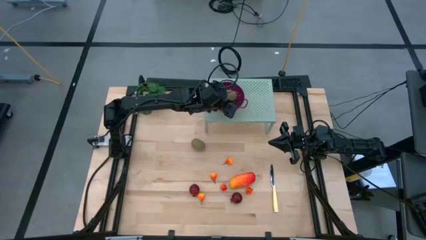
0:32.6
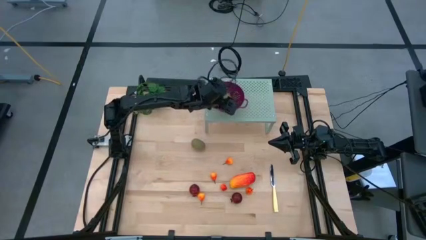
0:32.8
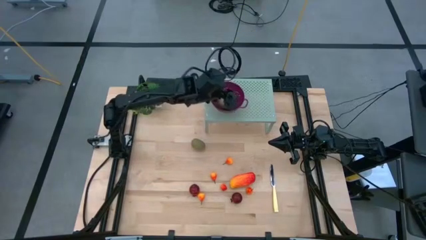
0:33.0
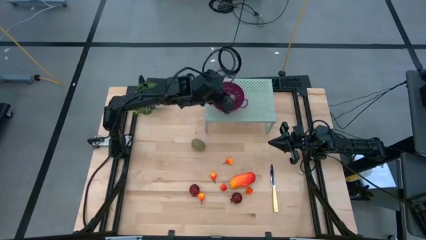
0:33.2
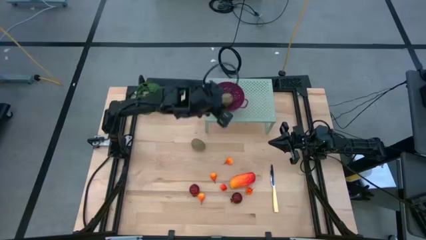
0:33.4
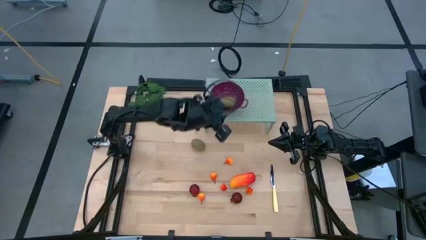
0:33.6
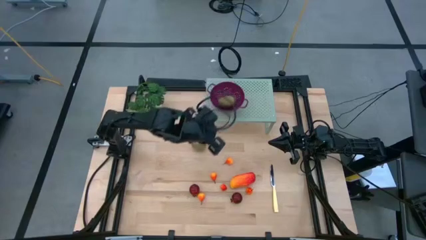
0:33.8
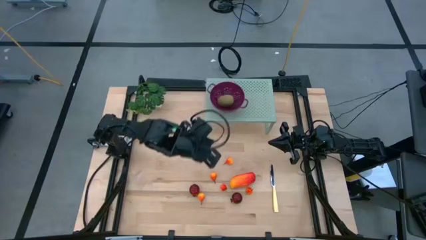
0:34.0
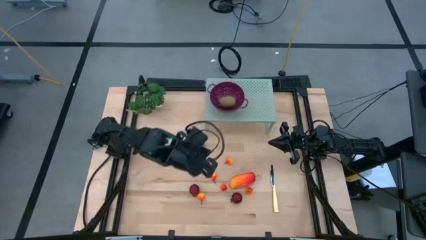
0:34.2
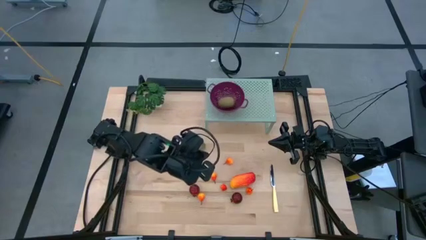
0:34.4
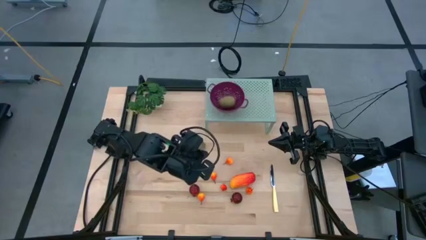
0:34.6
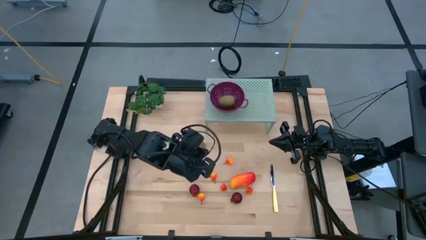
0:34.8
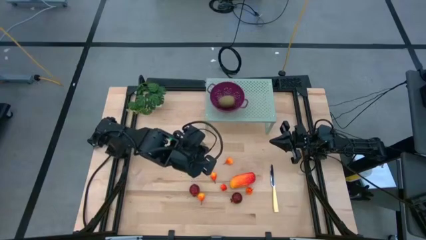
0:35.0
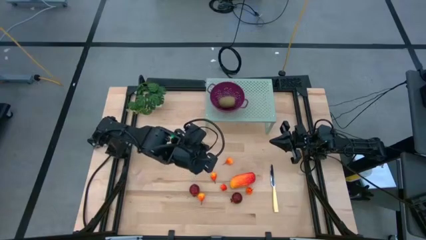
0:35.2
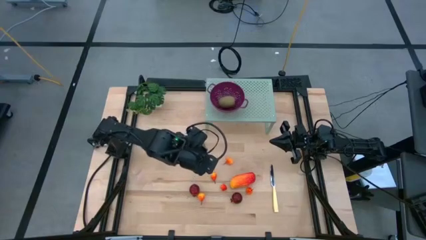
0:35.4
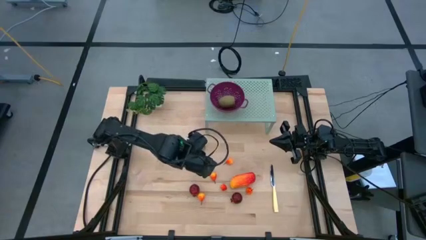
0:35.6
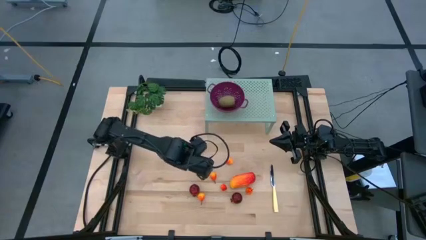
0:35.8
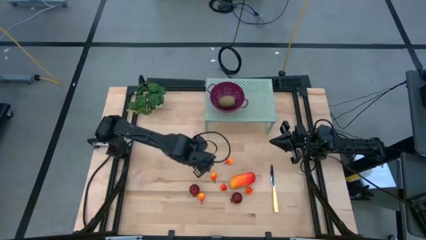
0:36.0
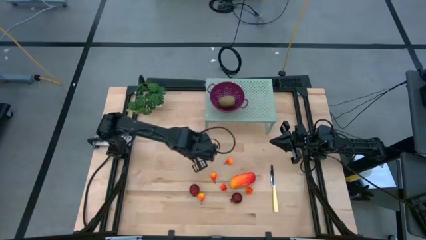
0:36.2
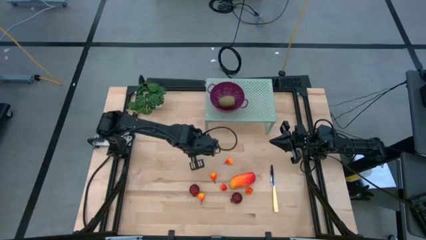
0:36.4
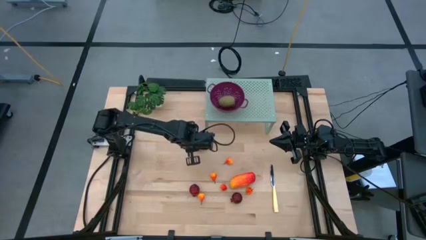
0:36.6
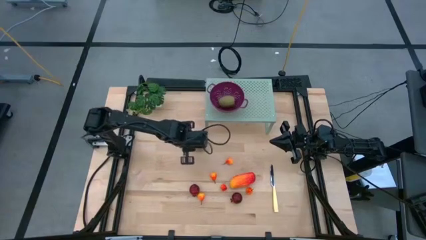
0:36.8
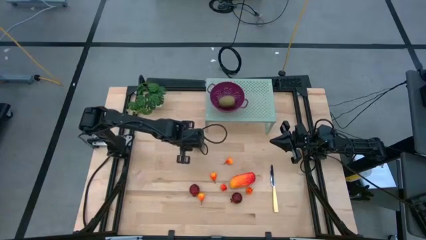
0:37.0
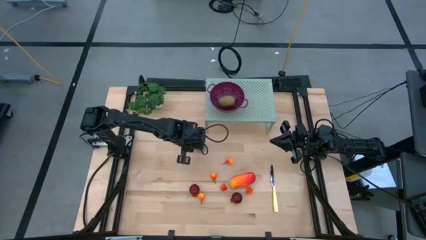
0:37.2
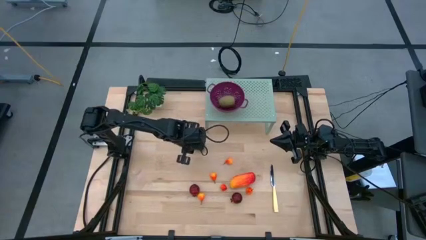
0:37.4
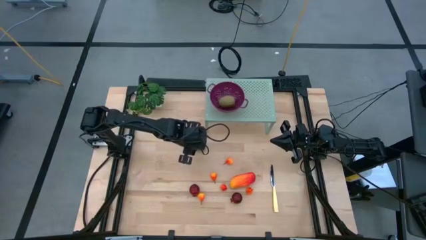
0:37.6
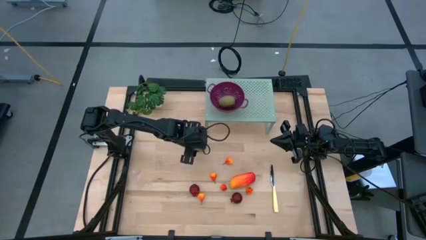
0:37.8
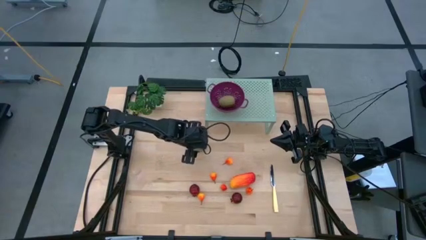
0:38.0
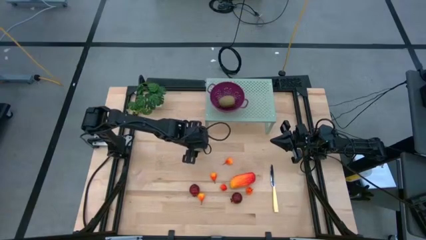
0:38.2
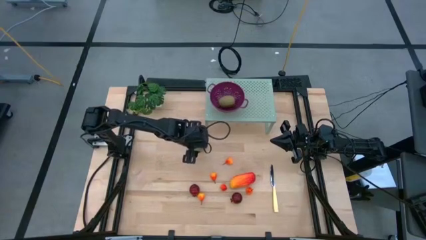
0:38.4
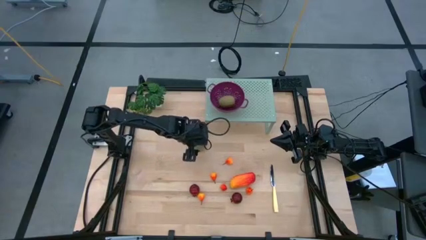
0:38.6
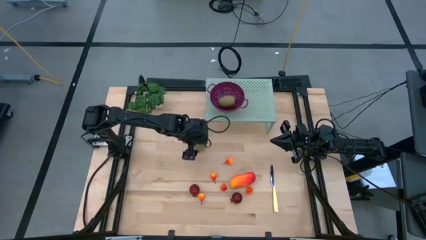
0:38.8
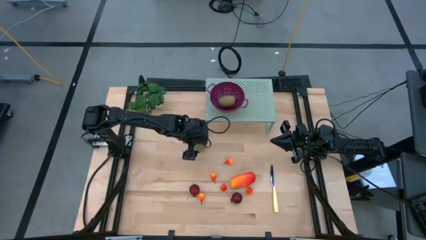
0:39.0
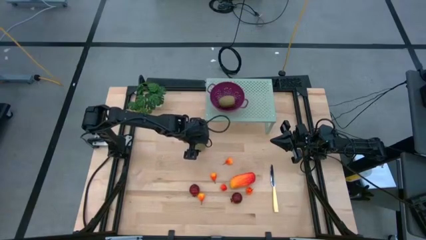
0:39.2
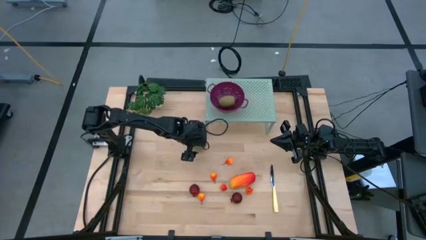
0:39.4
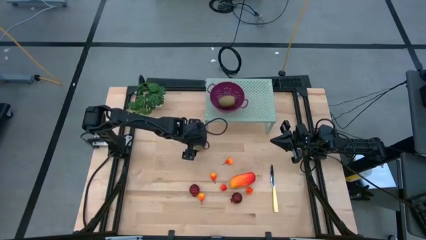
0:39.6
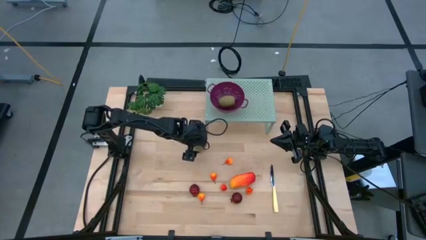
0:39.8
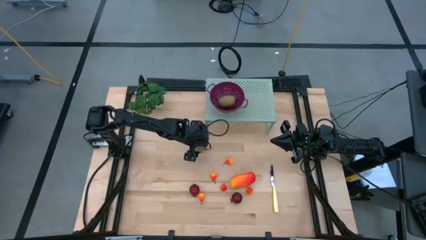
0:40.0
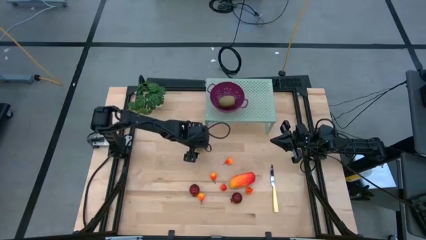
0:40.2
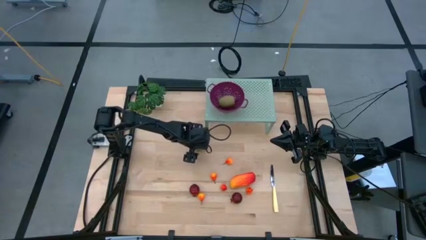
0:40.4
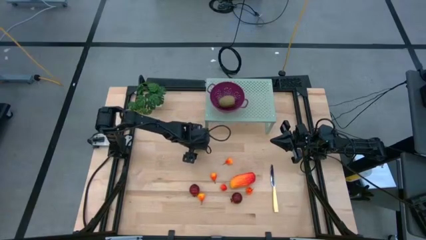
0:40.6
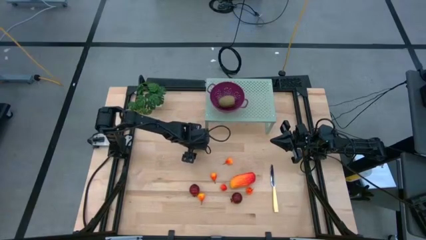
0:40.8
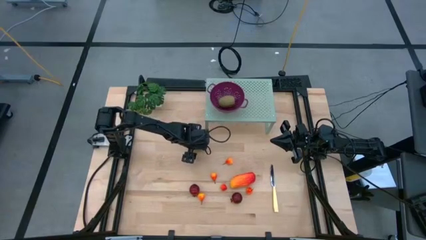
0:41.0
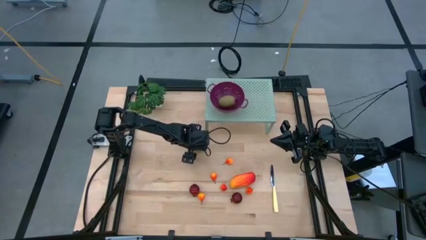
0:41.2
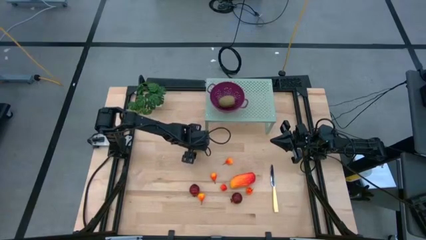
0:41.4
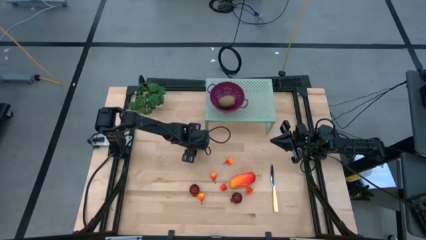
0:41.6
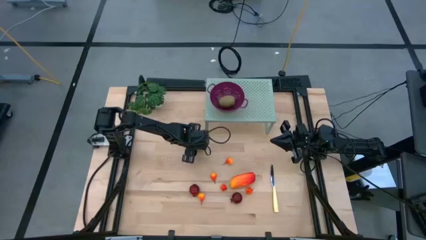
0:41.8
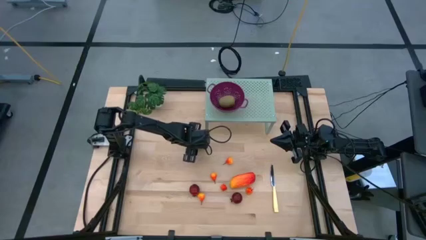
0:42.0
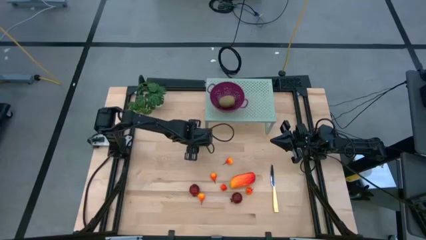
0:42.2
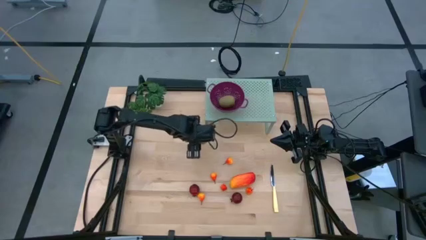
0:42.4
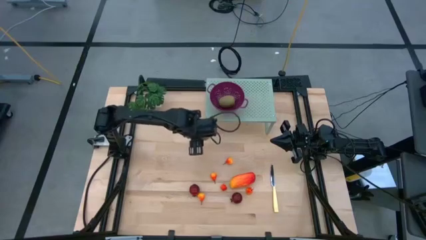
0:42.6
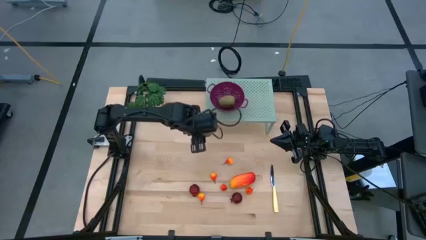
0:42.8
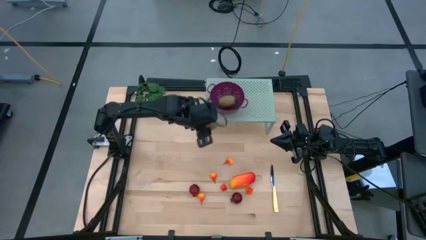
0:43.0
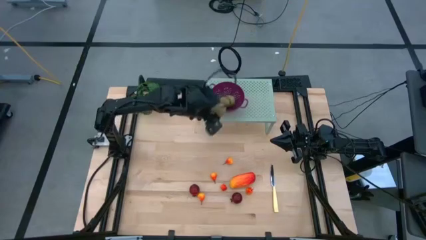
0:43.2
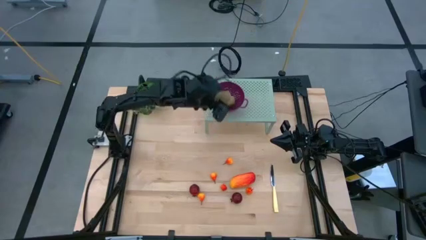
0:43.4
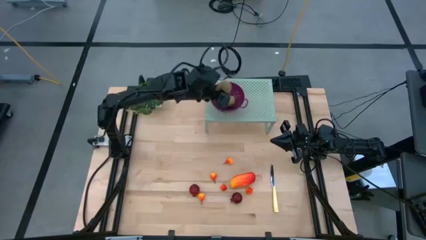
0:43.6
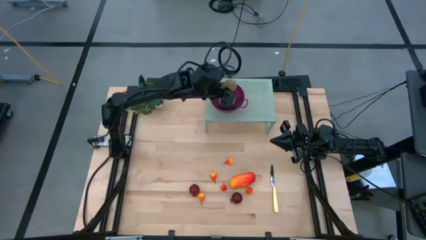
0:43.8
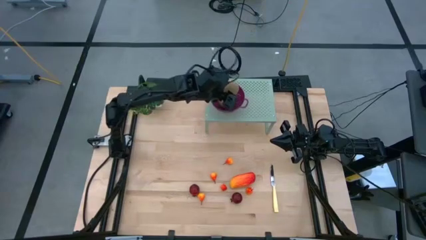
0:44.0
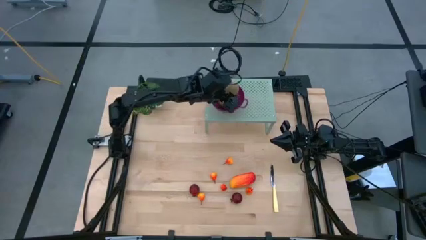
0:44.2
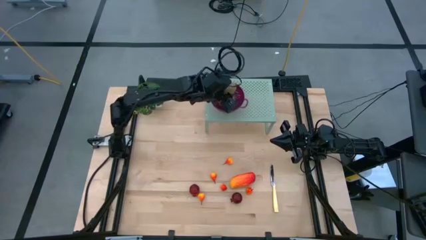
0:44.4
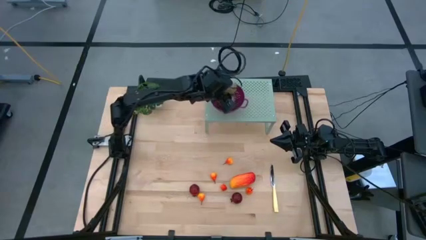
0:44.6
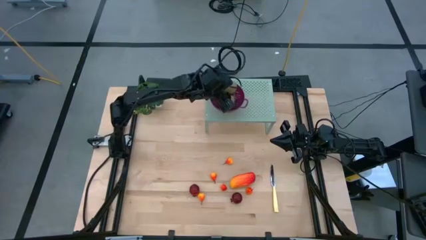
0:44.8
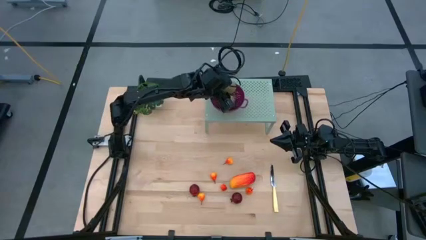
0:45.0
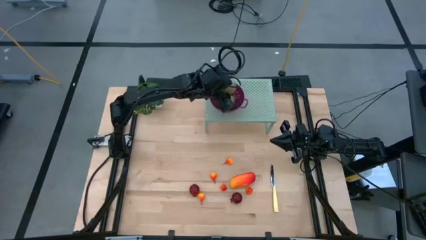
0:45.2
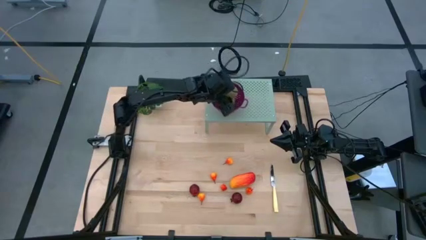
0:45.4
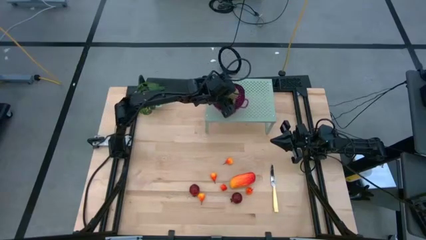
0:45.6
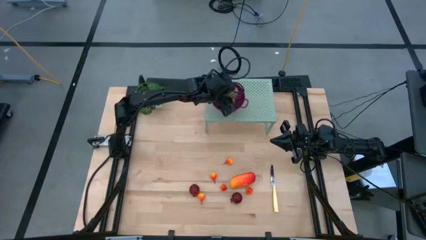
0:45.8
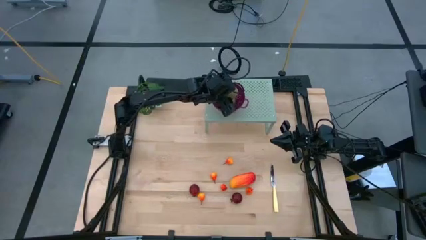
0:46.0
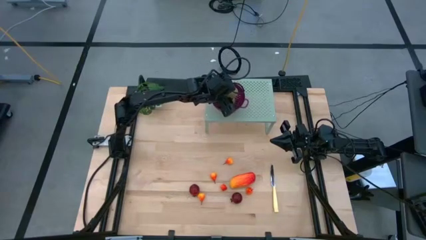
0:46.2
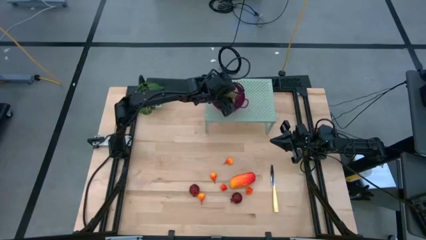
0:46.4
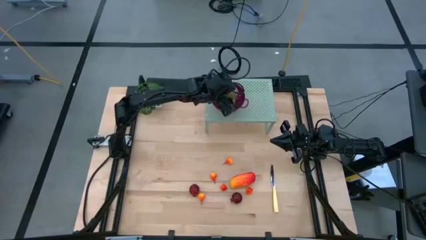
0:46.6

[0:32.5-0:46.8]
Task: Pick & Place Fruit
Put the kiwi into the strainer bowl on the shelf

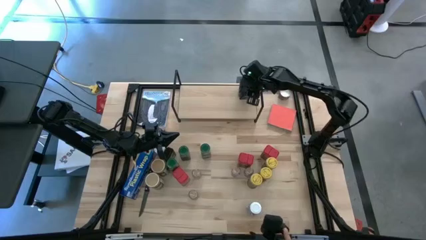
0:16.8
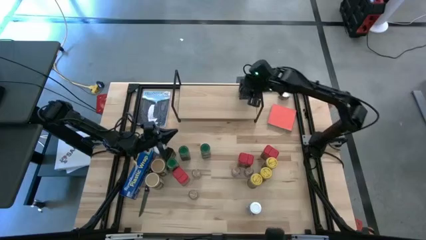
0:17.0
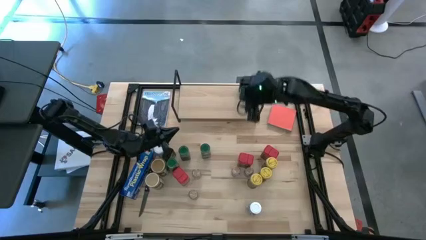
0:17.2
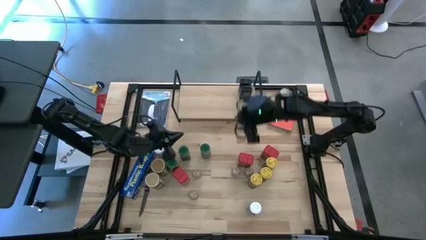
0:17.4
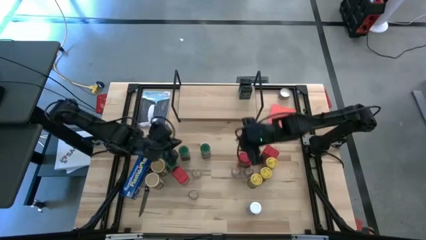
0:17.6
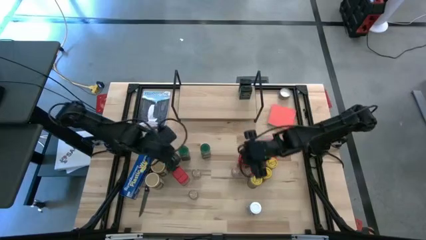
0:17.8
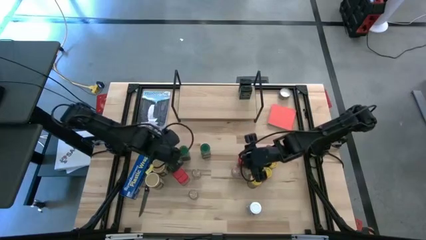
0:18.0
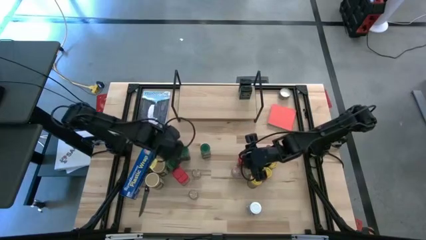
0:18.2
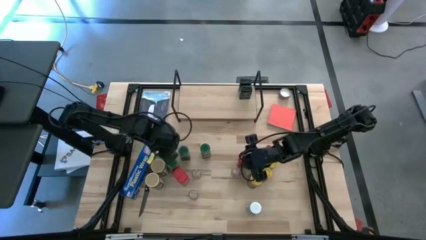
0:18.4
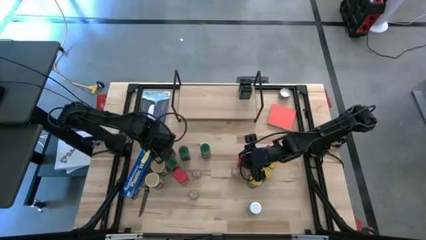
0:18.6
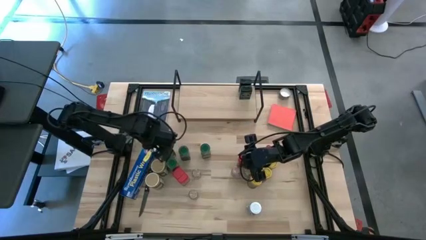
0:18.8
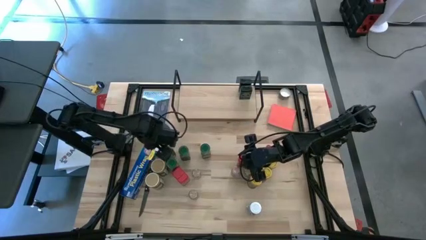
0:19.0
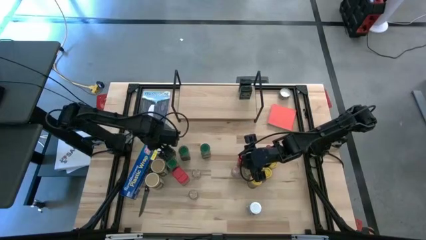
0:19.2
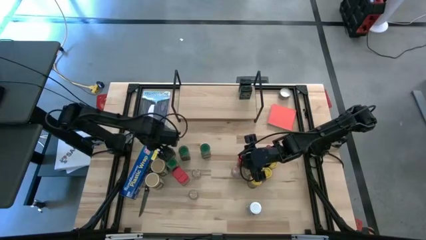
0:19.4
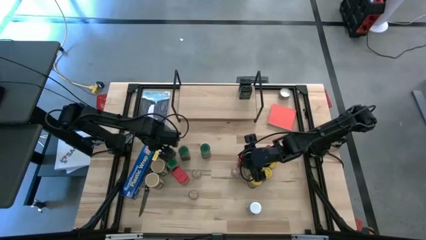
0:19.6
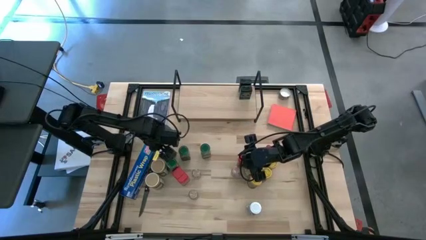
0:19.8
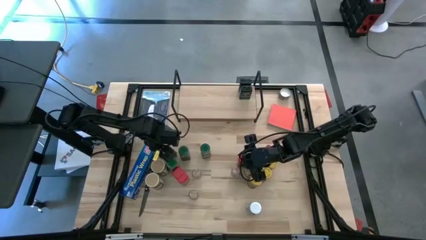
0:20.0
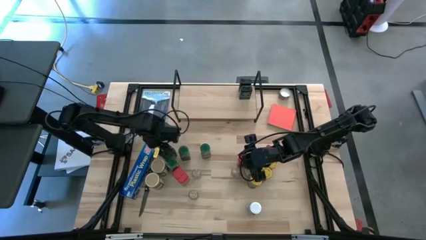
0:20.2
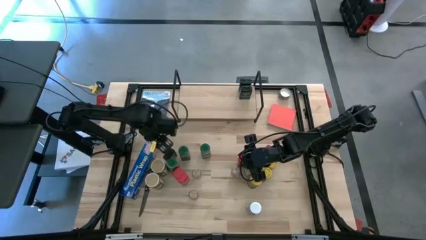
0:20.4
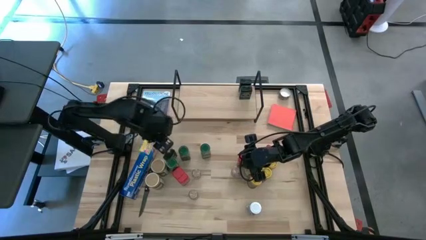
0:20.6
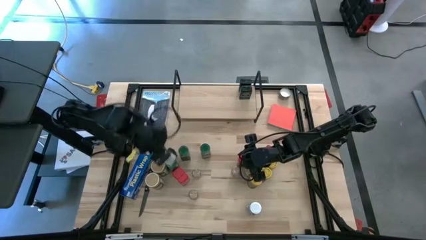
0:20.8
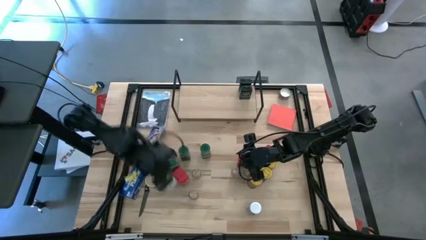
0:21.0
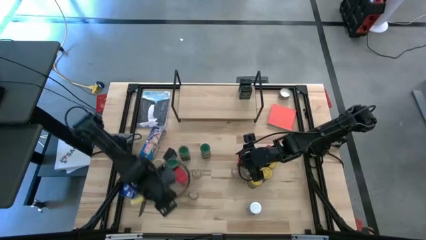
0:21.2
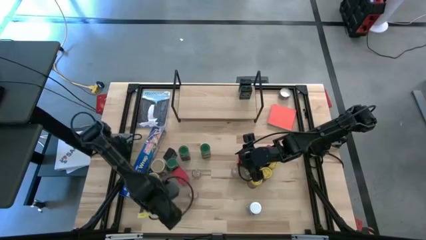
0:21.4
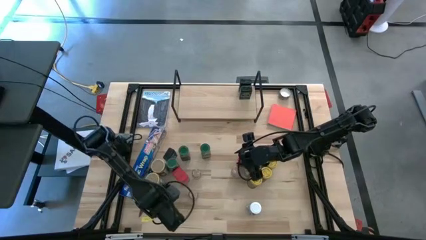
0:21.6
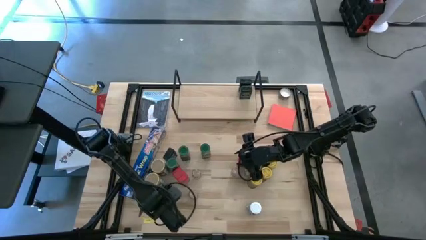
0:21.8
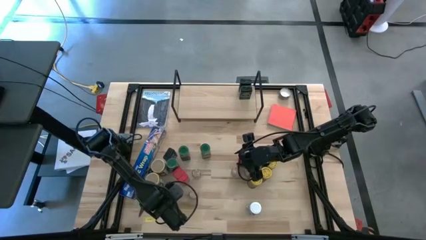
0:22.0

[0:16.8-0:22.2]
Task: Shelf spices
Move the white seasoning bottle to the bottom left of the table
